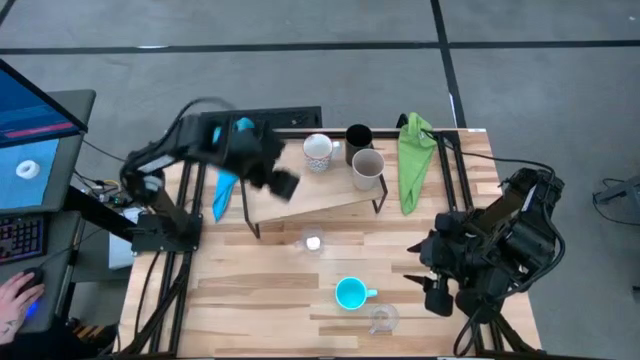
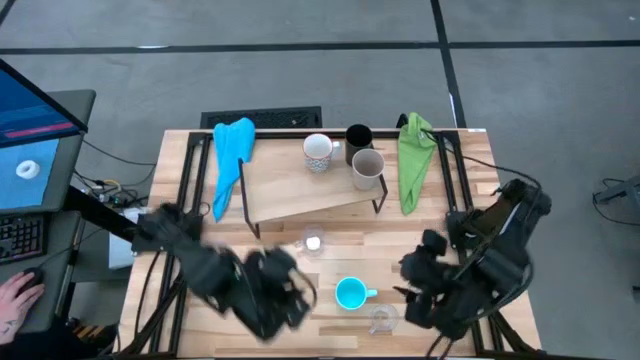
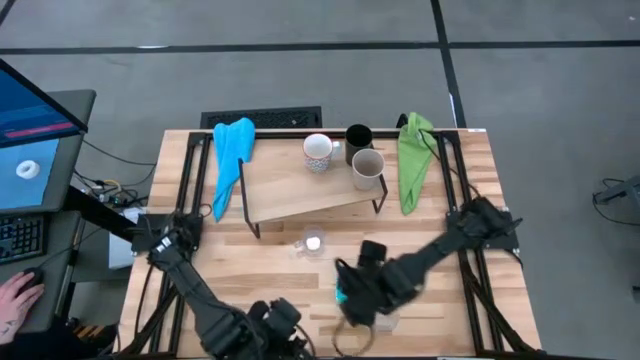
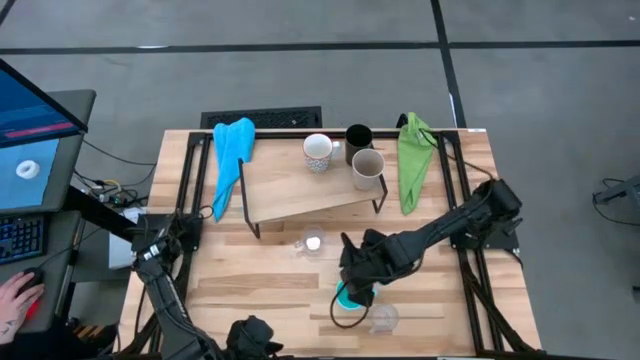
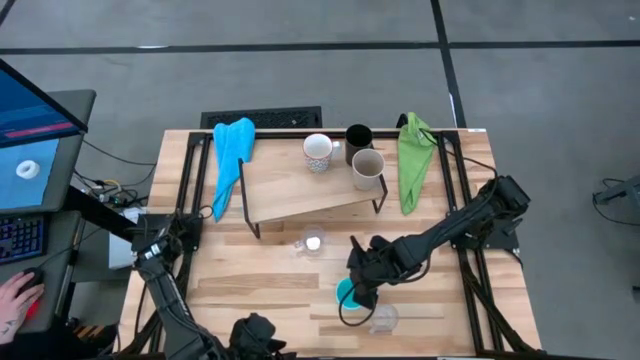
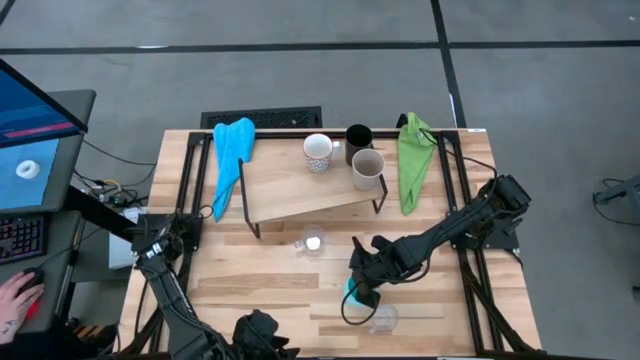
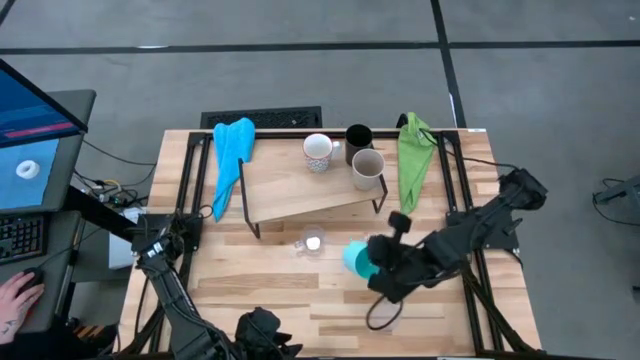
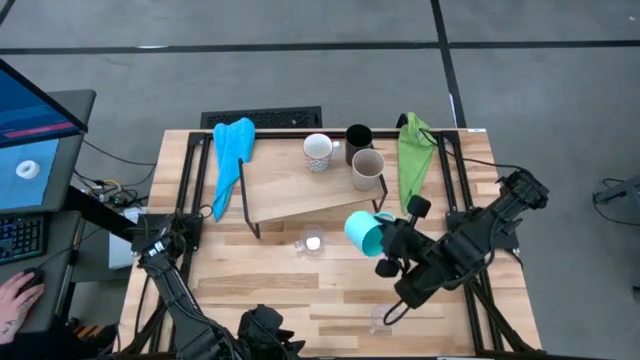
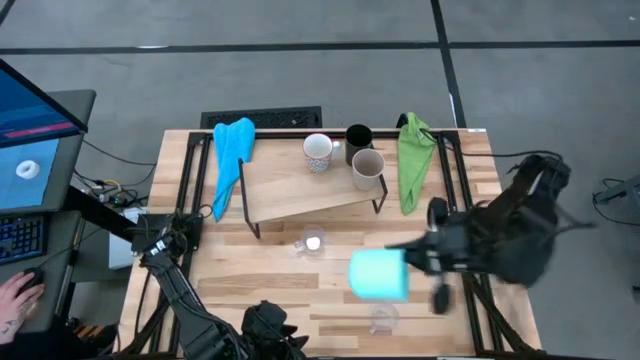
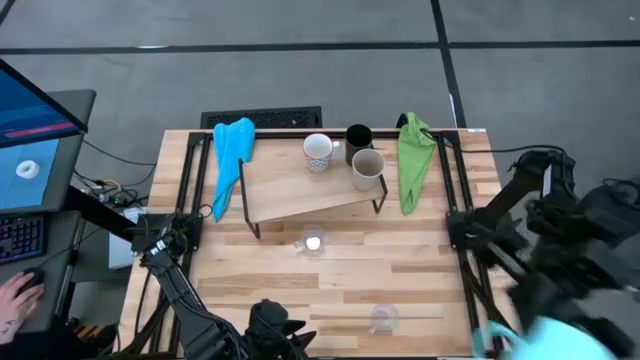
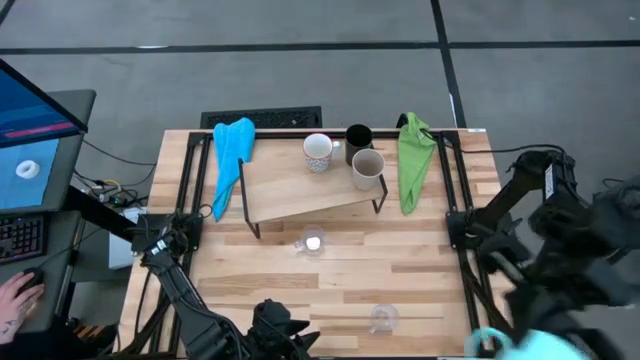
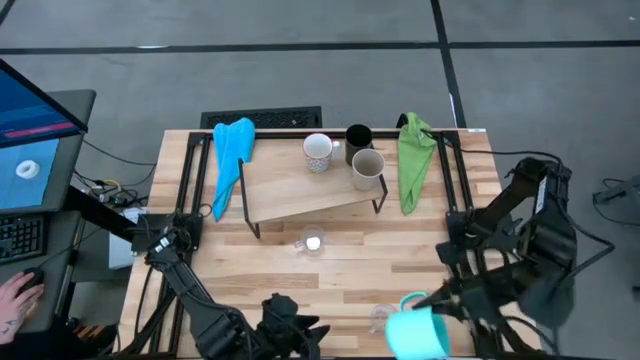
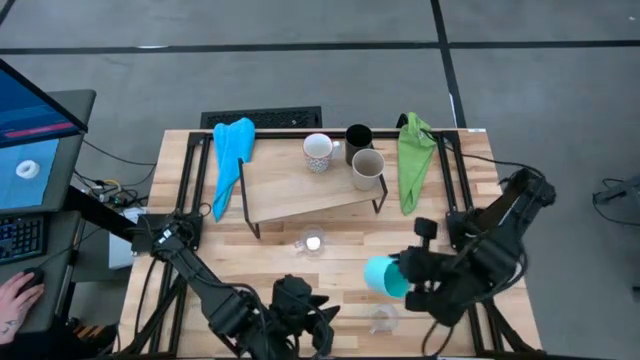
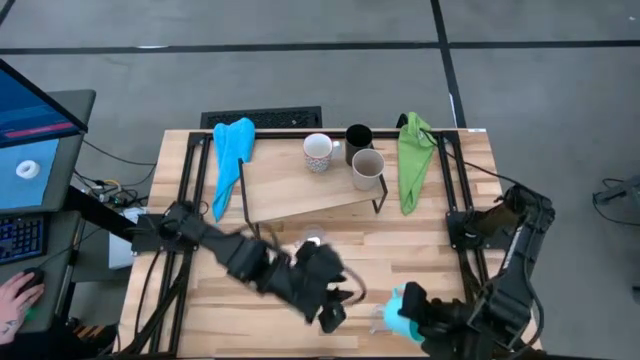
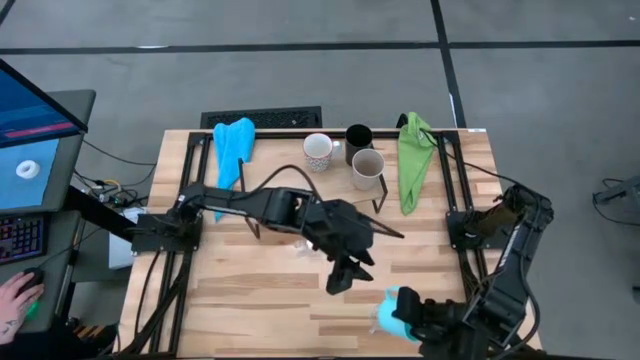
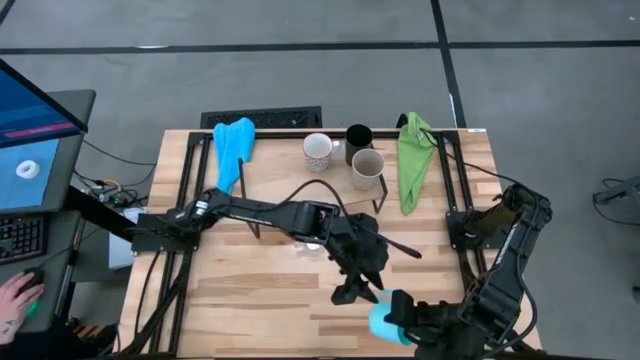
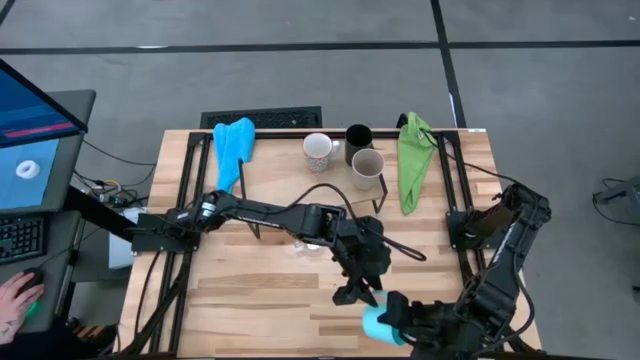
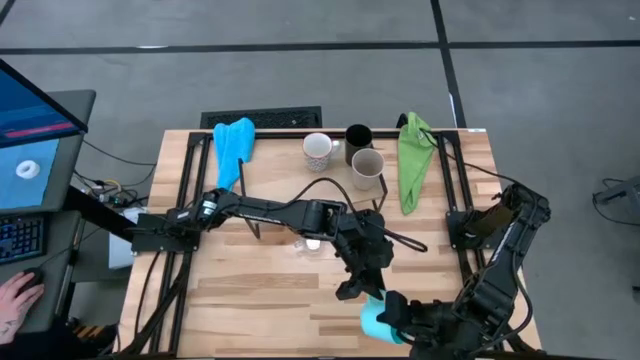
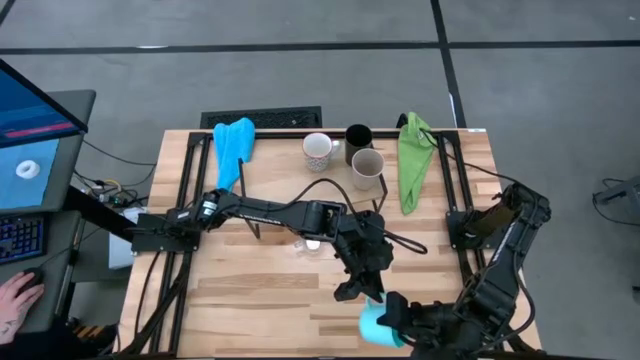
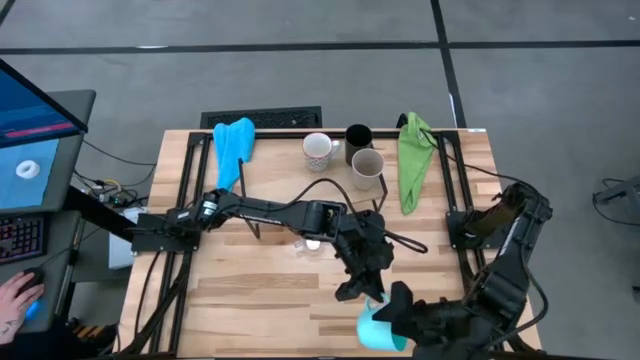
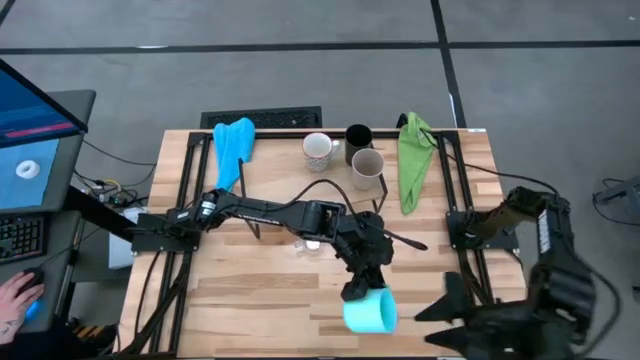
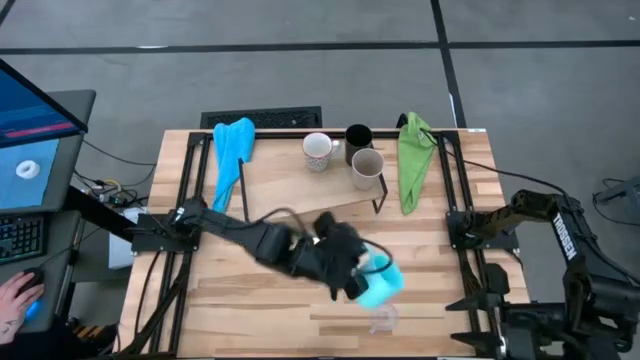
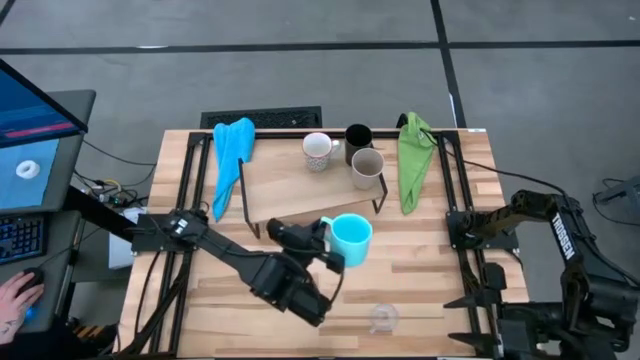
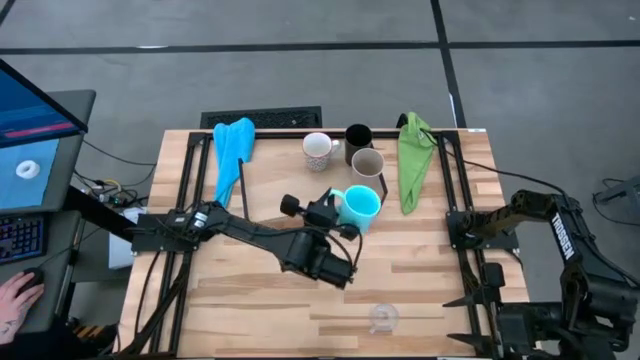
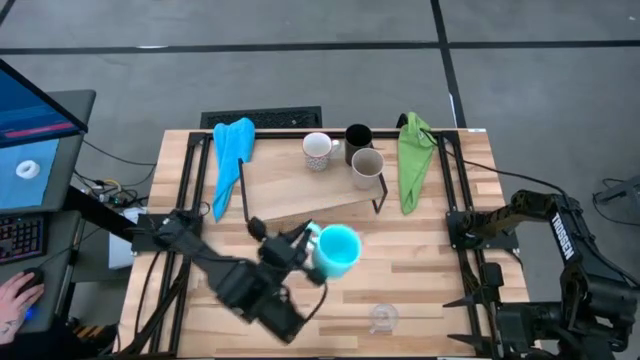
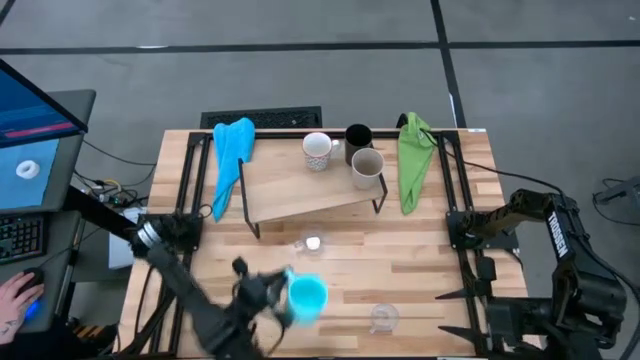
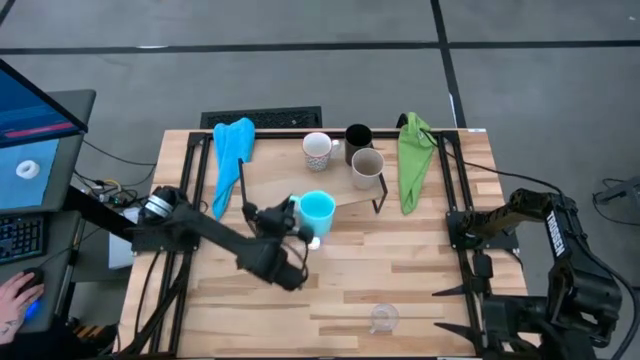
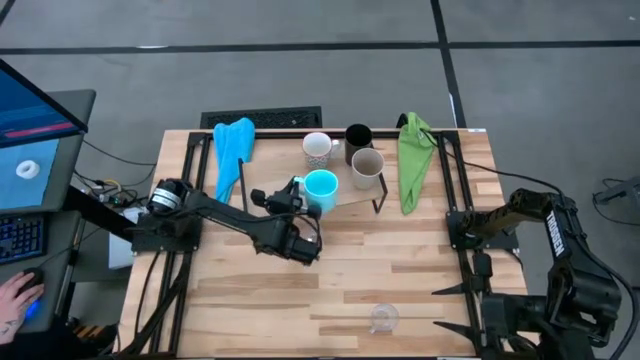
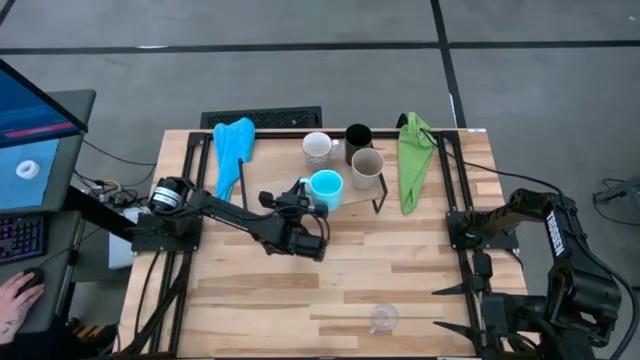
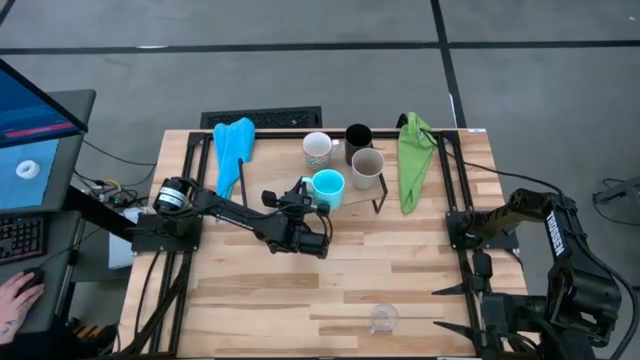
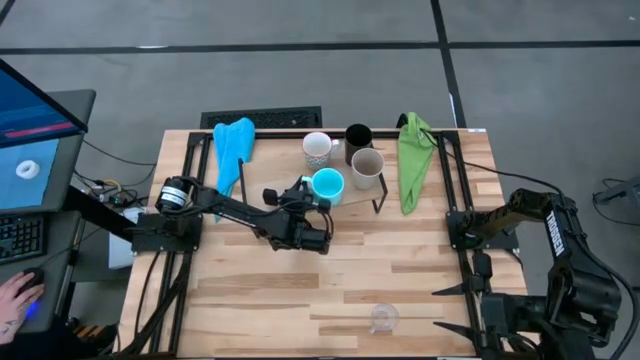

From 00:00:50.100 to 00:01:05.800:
Task: Stack small to large cups/mugs on shelf
Put the blue mug on the shelf

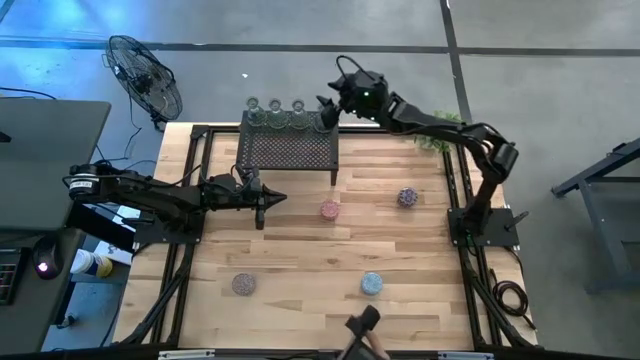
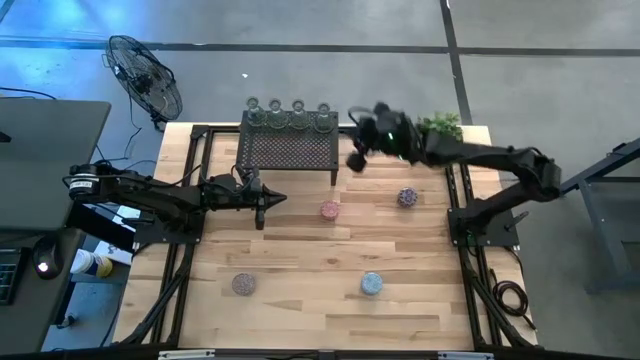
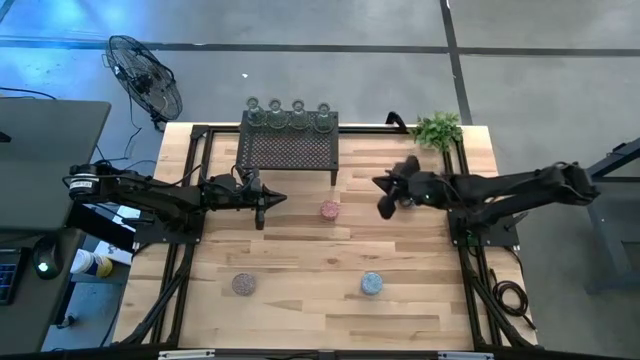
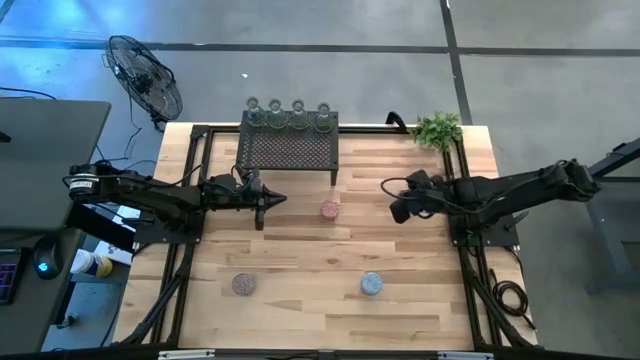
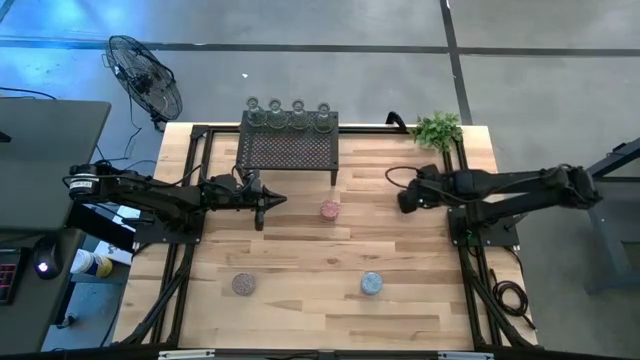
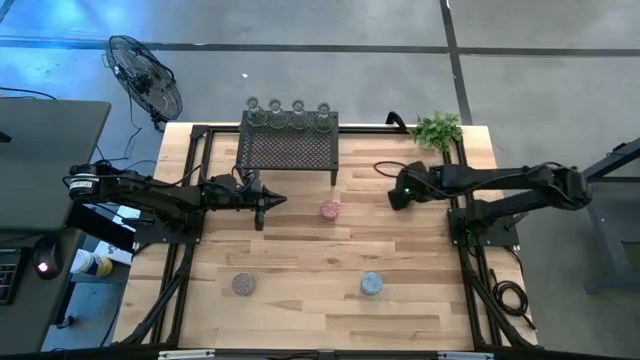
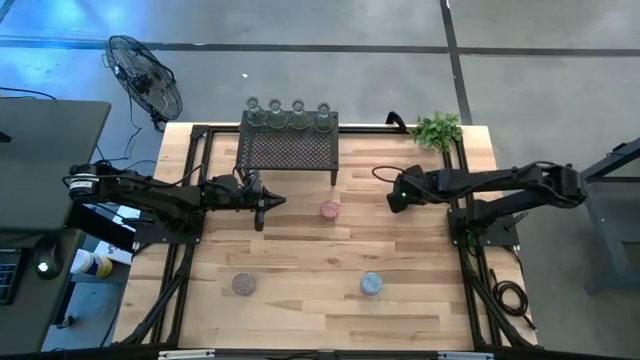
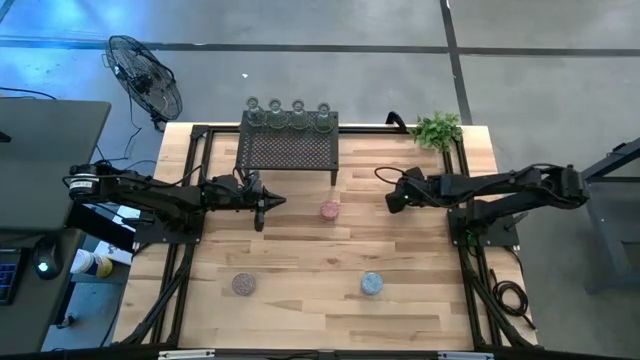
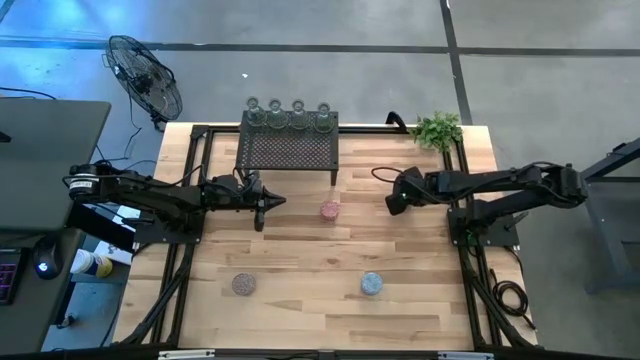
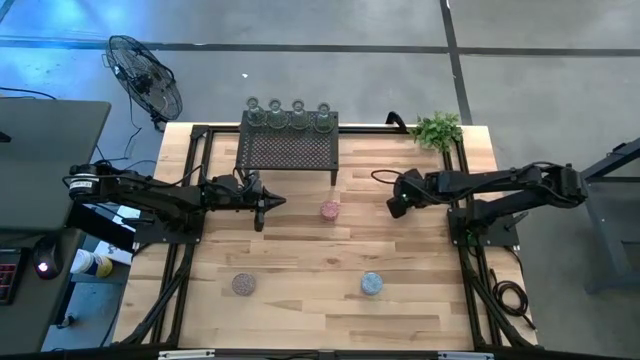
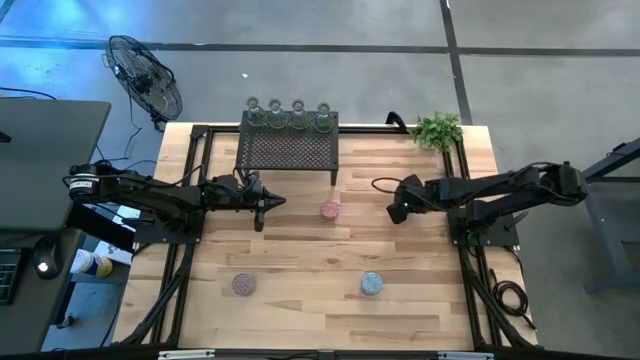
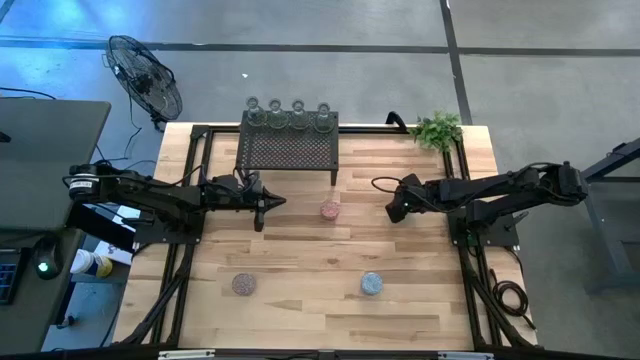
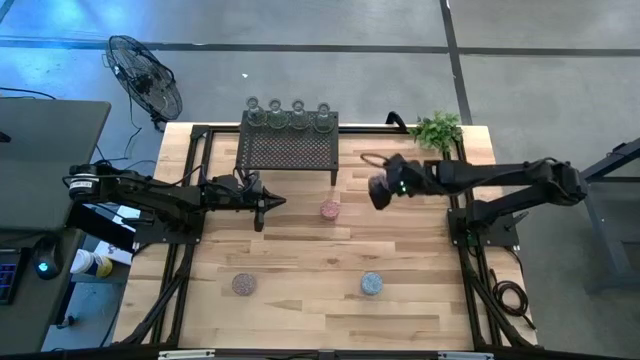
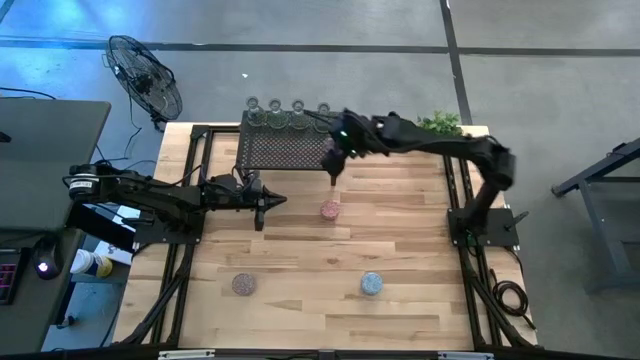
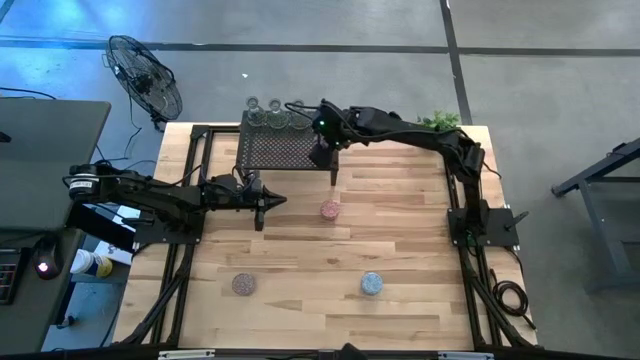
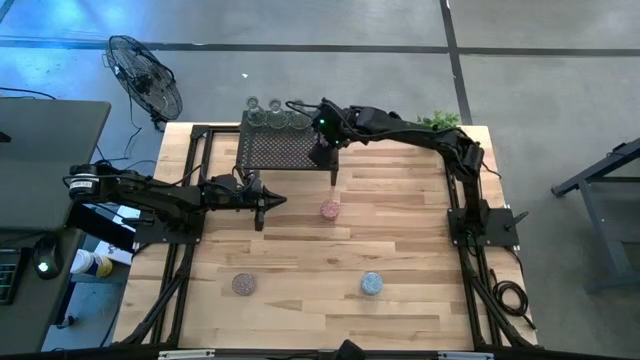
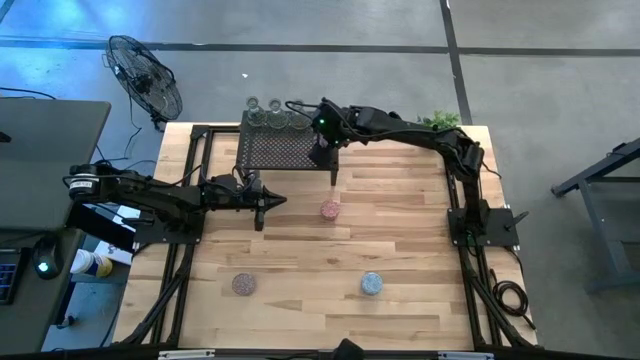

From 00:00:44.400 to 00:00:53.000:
Task: Pick & Place candle stick holders
Put the black scented candle on the shelf
